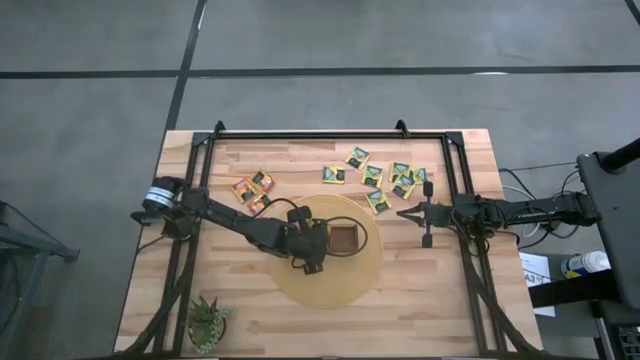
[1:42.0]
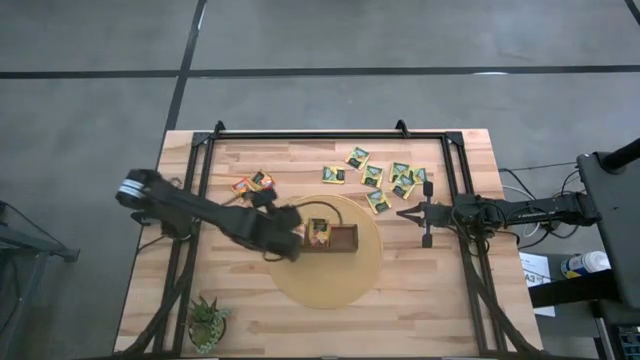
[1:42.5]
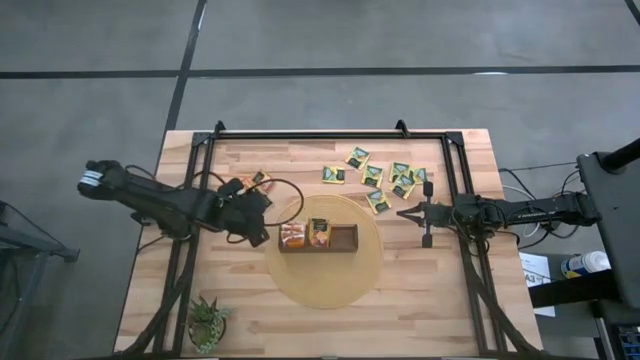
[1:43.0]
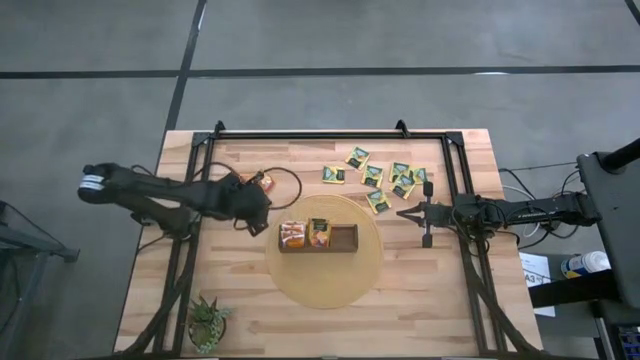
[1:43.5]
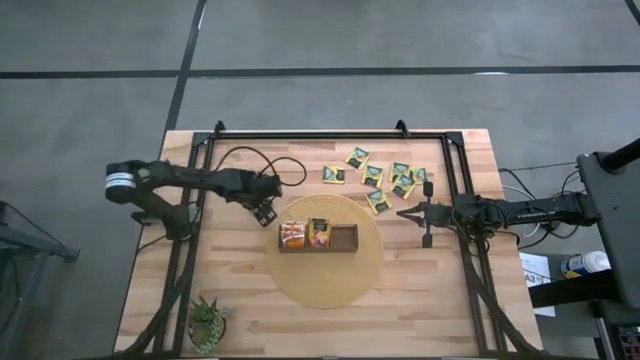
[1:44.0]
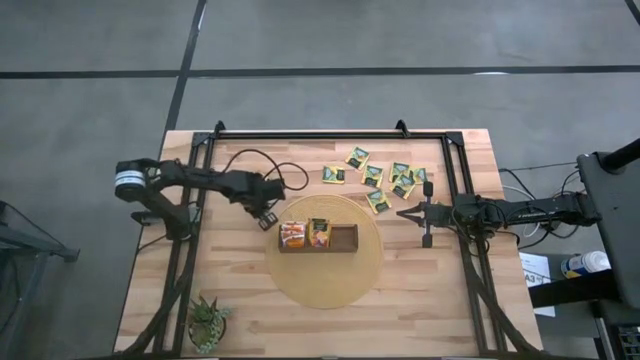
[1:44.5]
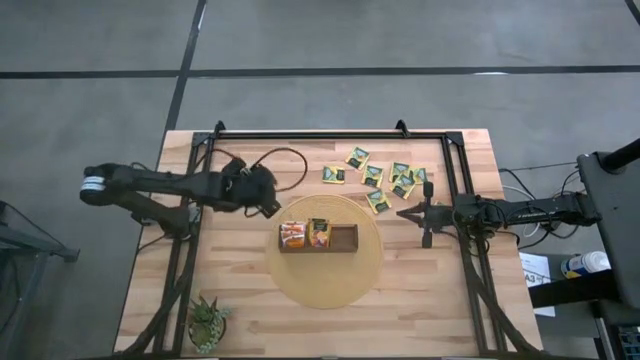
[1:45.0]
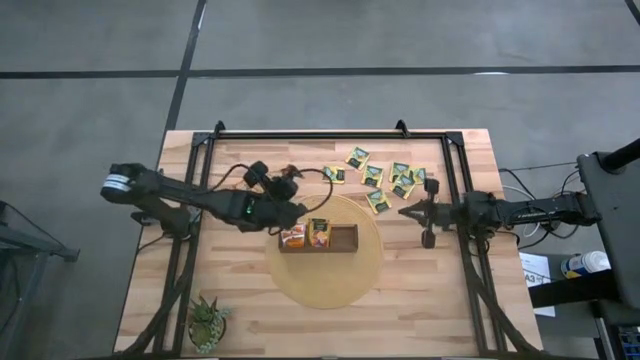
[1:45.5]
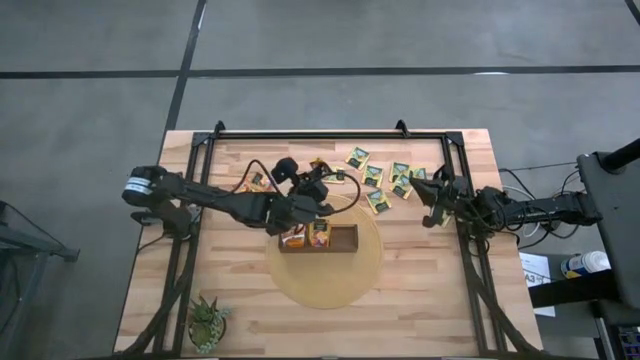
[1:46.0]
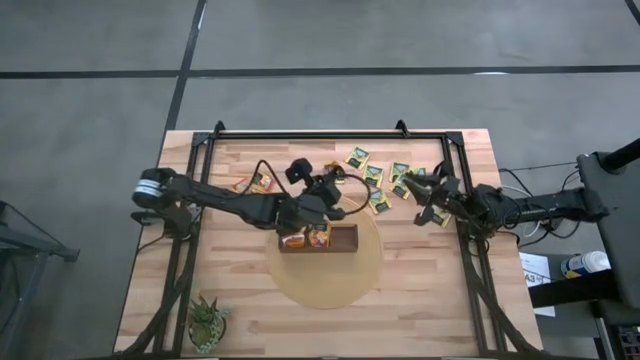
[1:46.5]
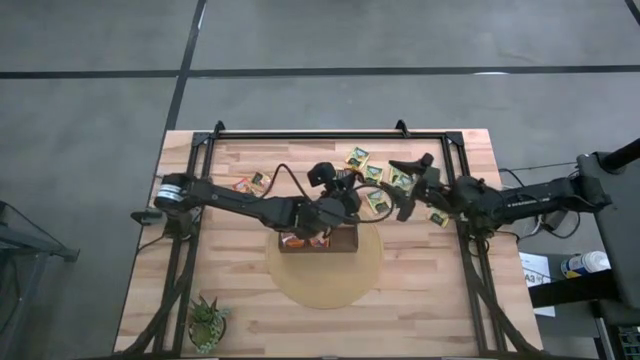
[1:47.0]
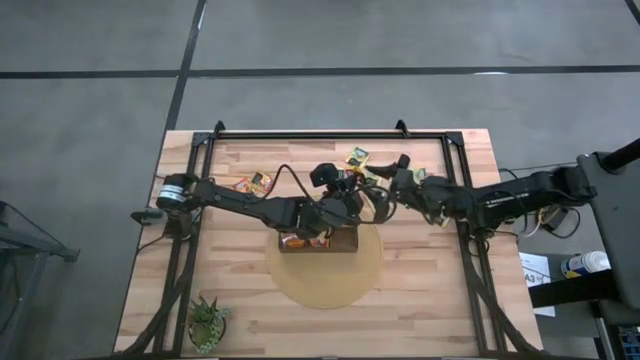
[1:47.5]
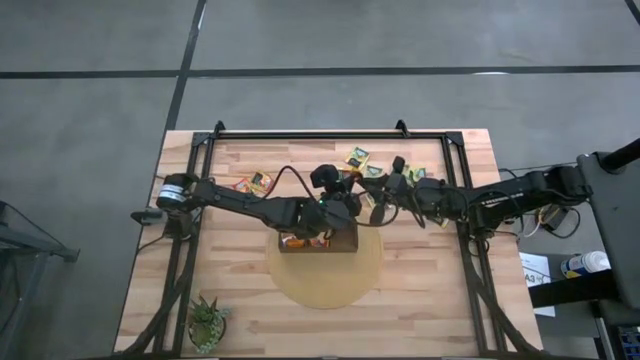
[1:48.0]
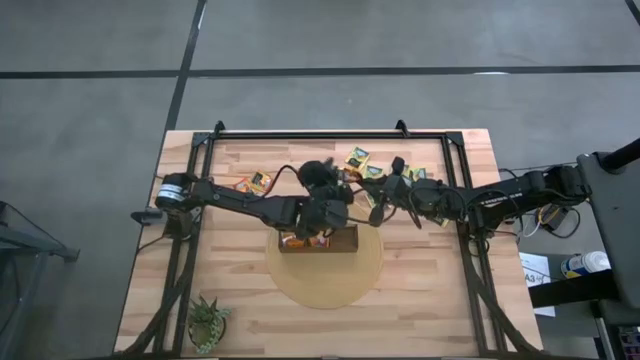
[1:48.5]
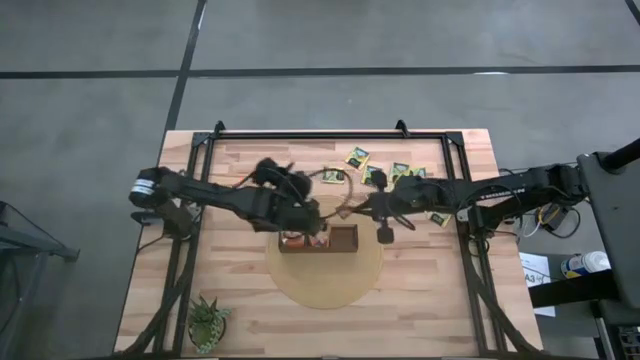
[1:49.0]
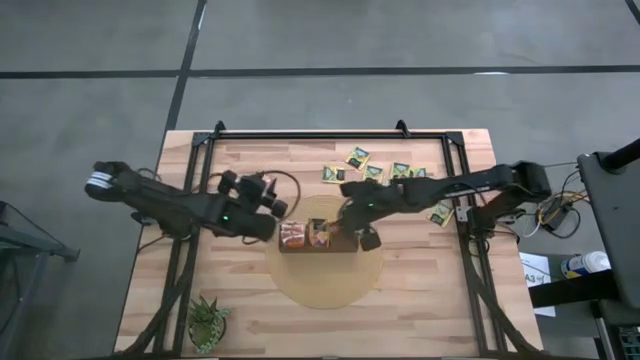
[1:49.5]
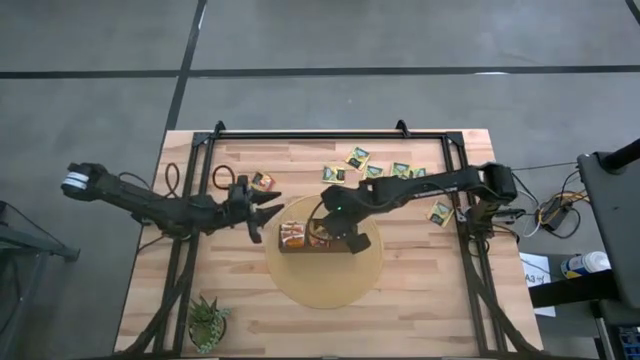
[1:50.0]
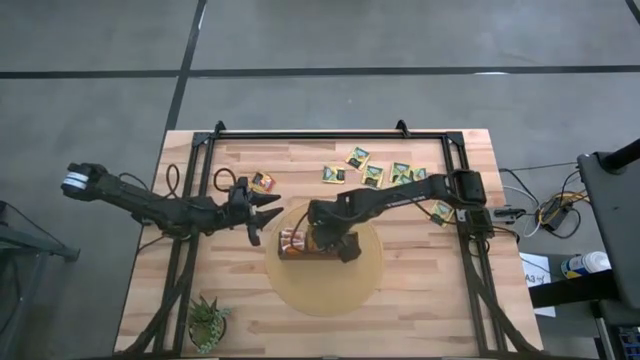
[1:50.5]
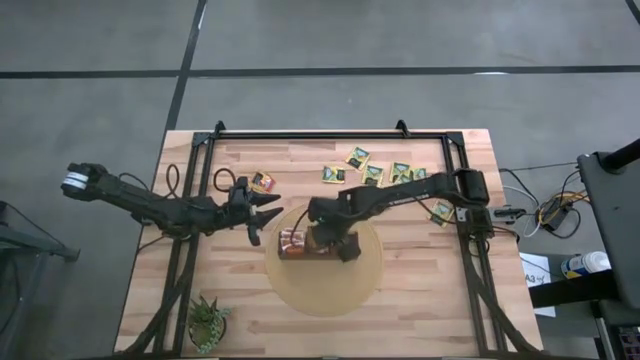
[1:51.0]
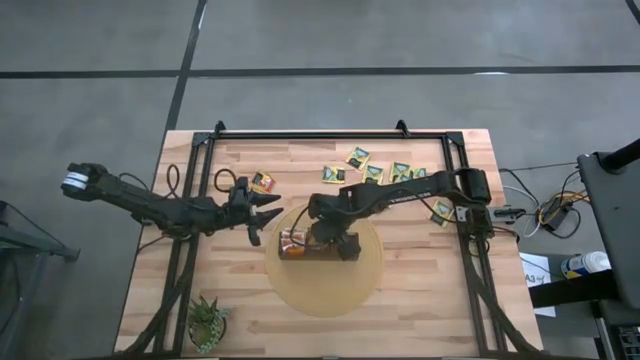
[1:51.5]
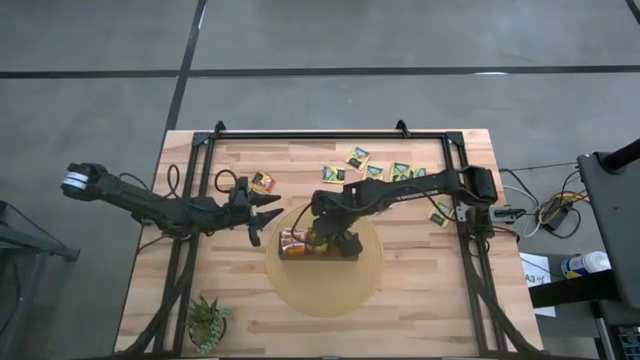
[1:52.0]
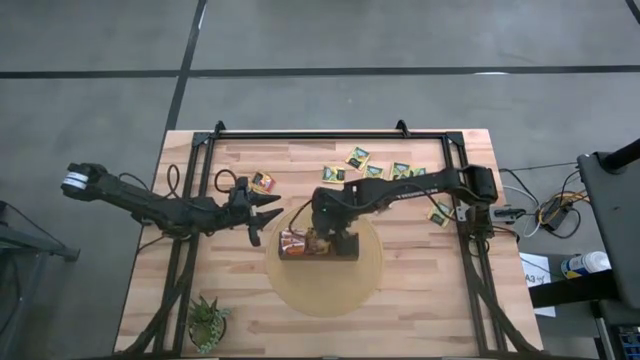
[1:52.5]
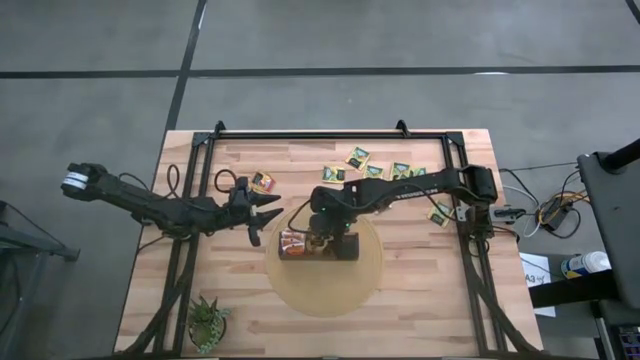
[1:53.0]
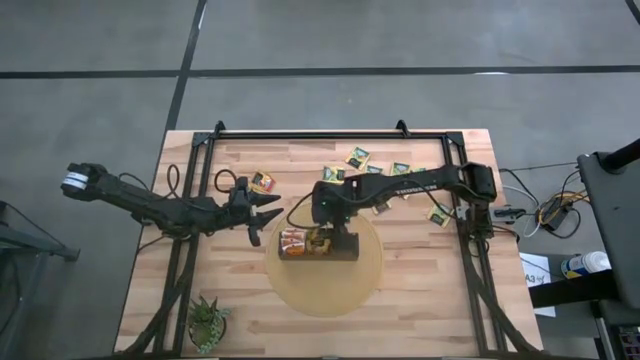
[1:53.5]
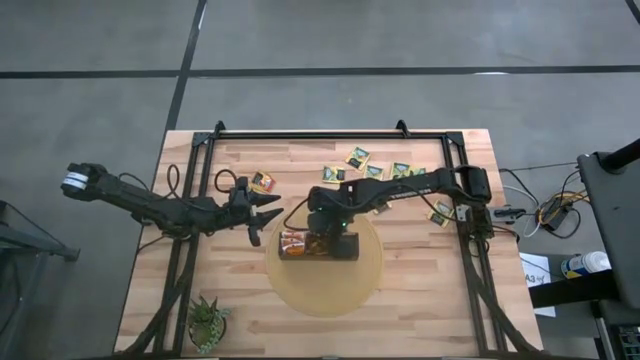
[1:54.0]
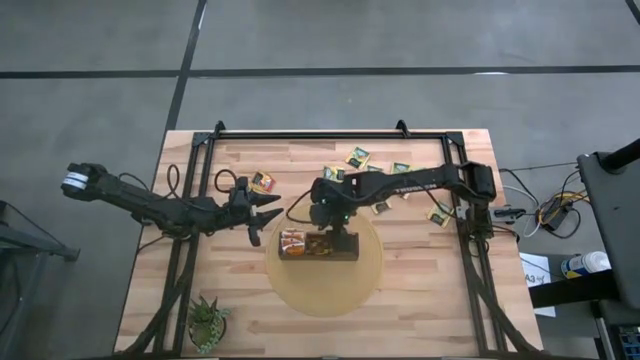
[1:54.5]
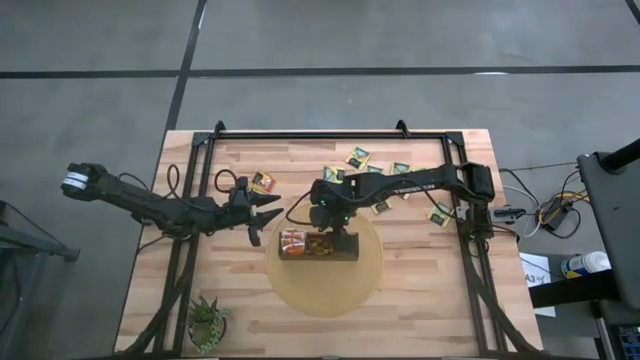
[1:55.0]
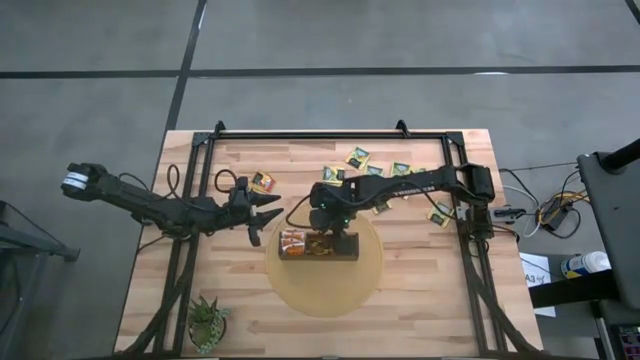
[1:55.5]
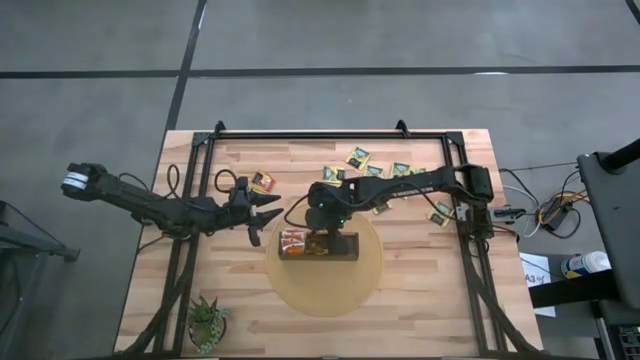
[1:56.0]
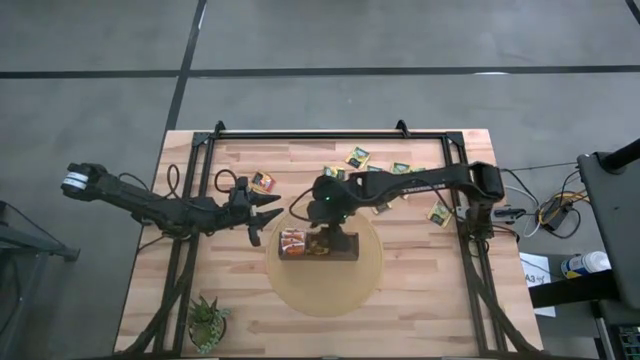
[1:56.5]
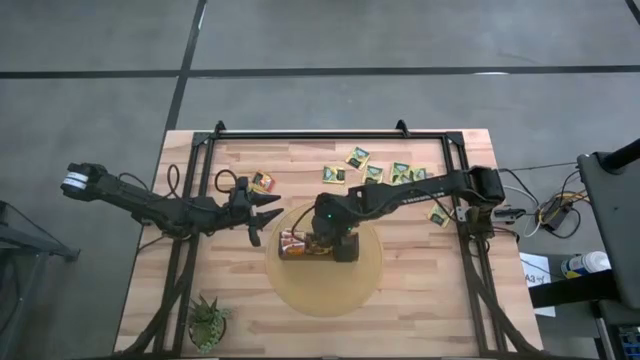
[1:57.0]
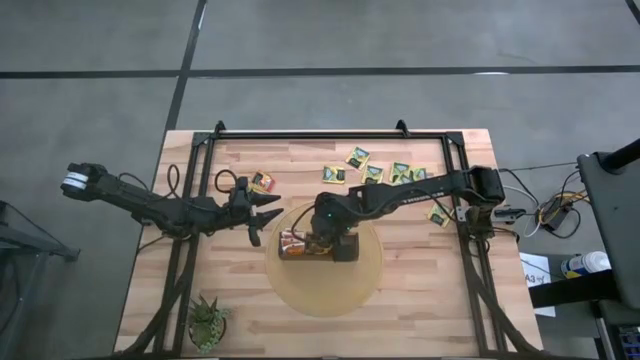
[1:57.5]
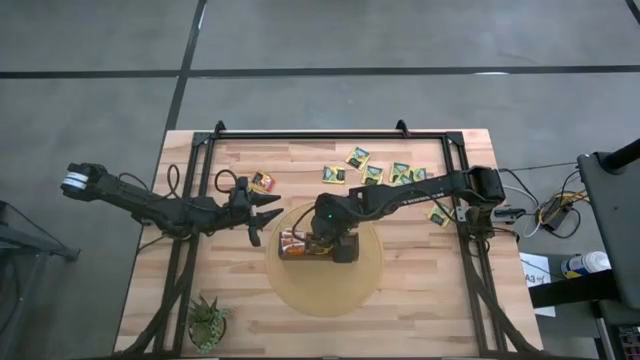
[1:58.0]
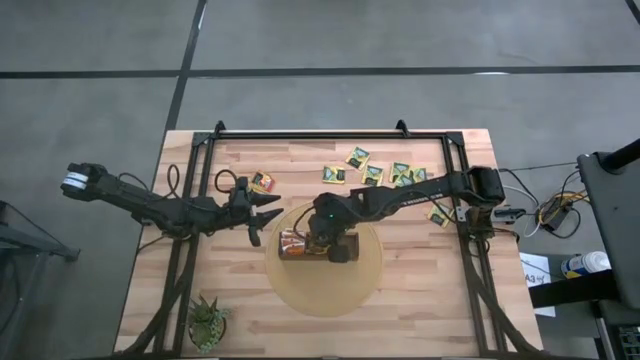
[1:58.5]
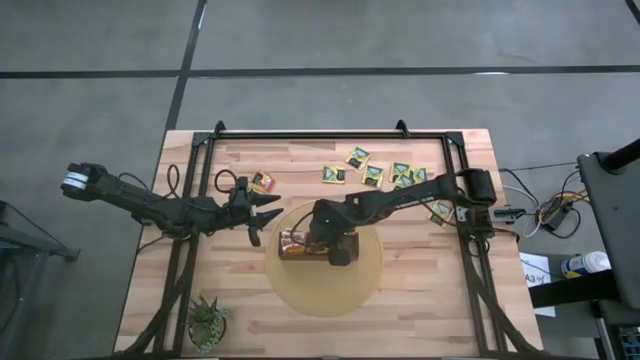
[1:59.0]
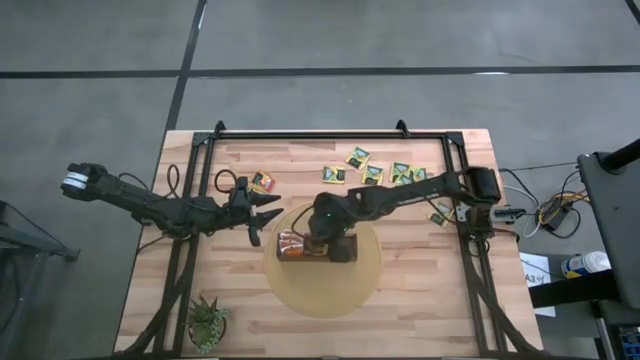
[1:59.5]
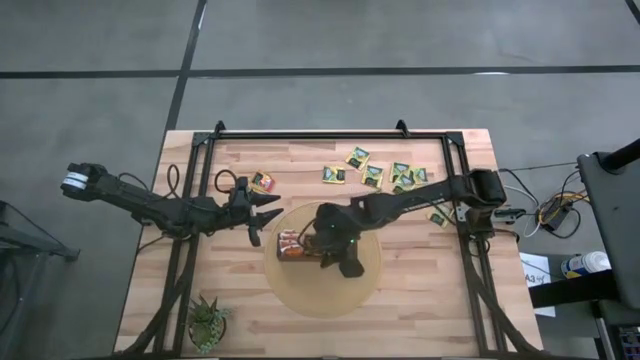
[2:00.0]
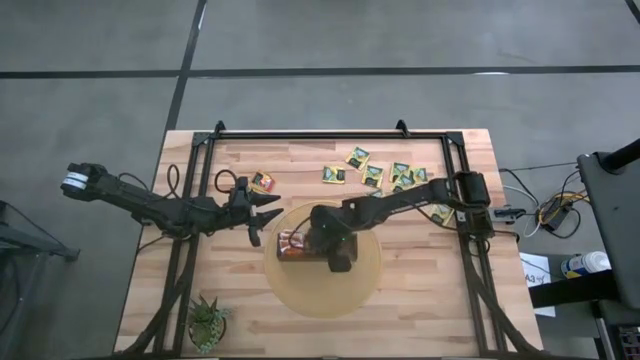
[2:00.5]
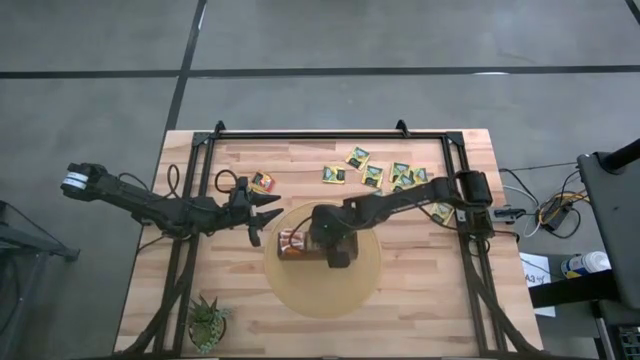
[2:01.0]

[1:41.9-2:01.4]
Task: Pick & Place Tea
Put the orange tea bag into the middle section of the wooden organizer

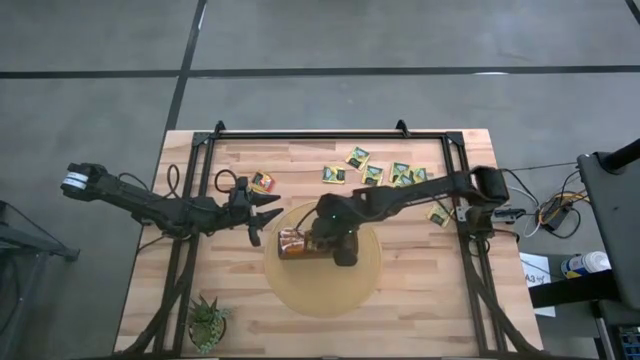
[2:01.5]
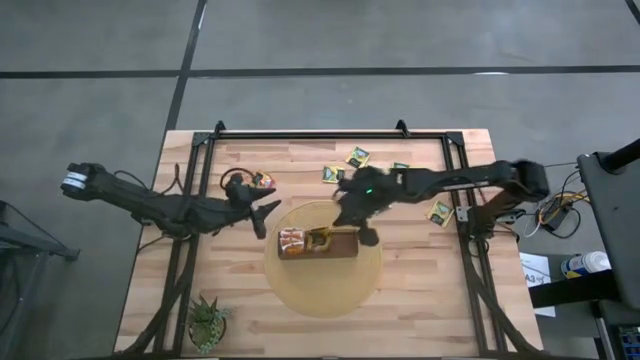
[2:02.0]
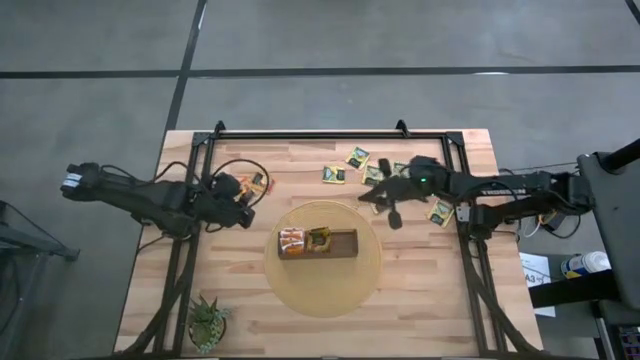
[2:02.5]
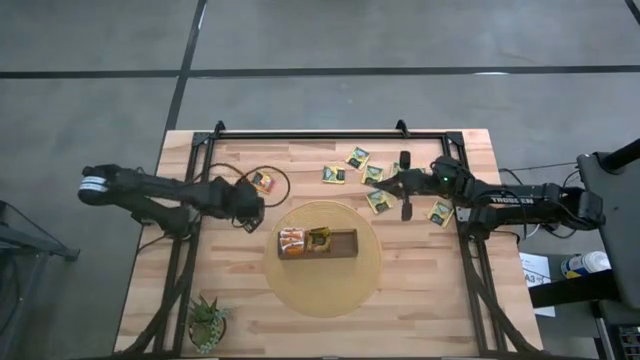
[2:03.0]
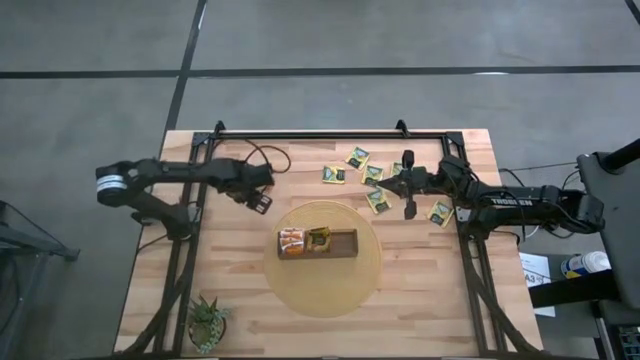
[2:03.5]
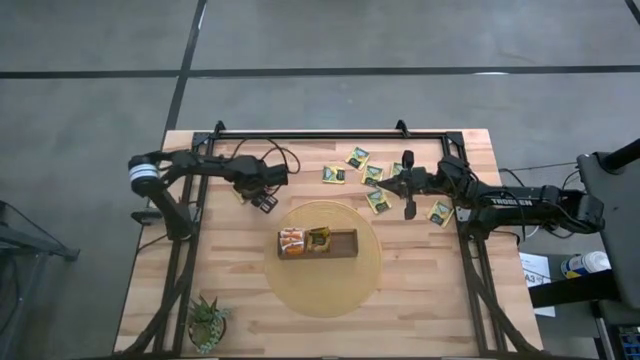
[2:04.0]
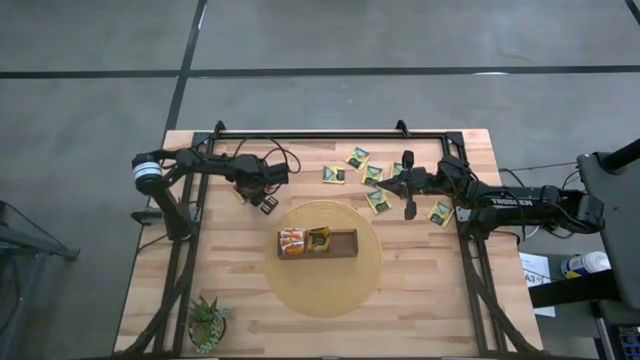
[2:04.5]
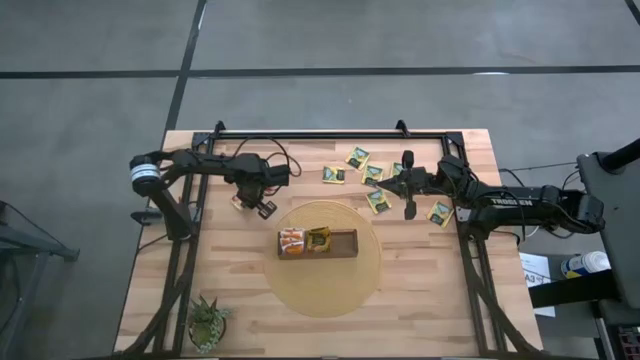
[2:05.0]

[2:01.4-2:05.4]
Put the orange tea bag into the middle section of the wooden organizer
